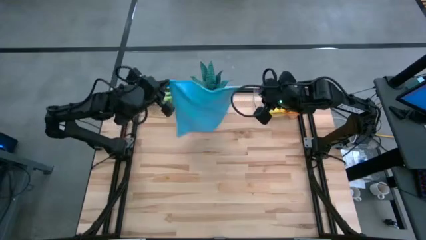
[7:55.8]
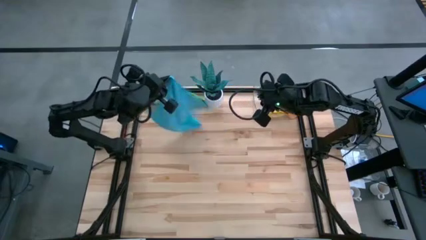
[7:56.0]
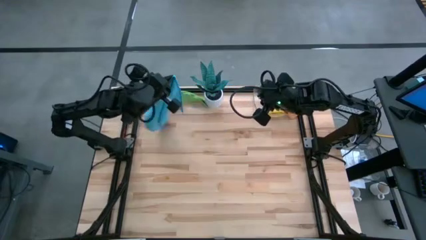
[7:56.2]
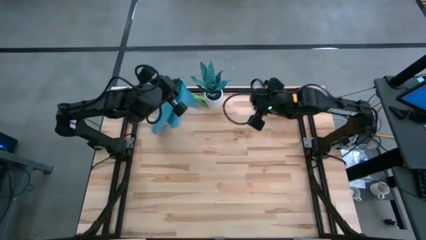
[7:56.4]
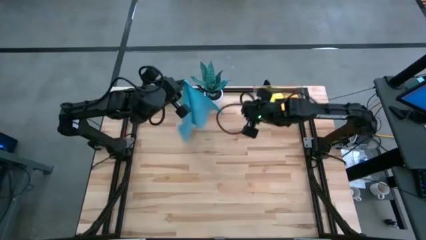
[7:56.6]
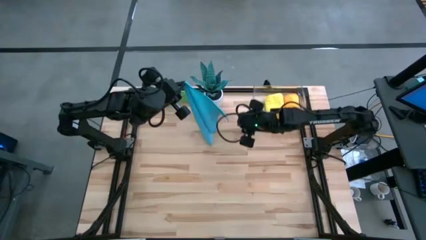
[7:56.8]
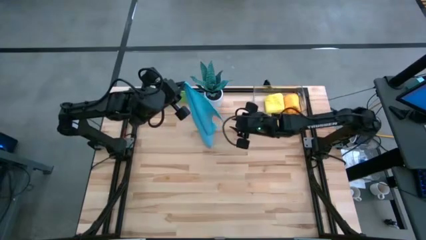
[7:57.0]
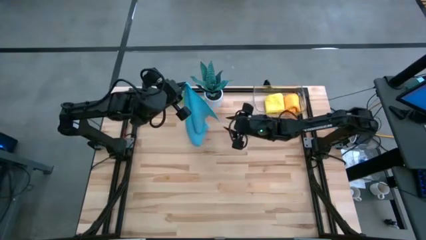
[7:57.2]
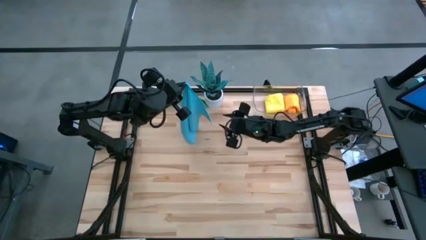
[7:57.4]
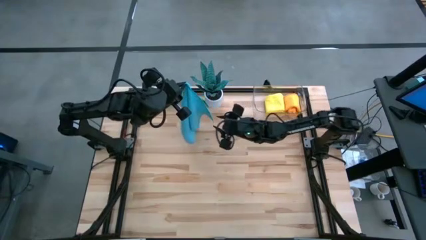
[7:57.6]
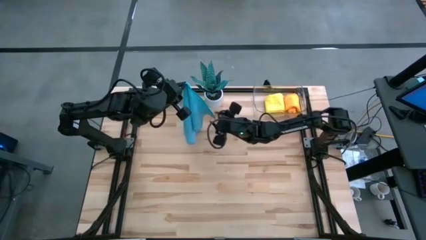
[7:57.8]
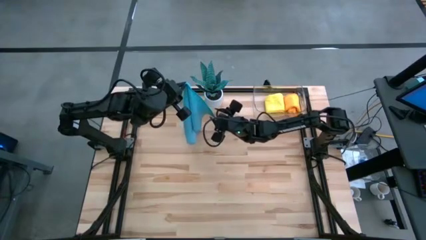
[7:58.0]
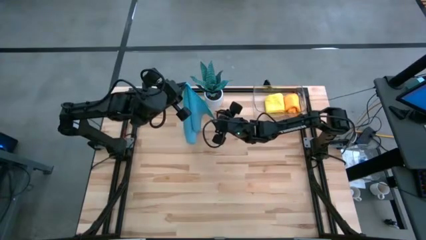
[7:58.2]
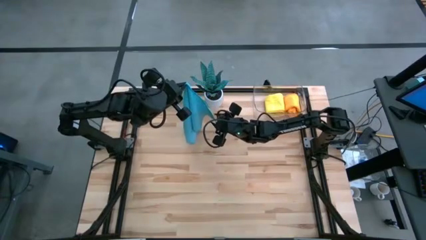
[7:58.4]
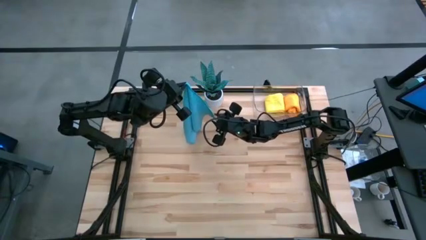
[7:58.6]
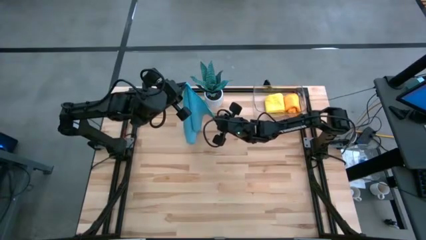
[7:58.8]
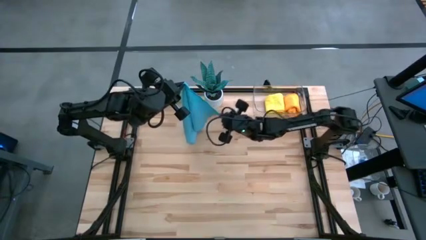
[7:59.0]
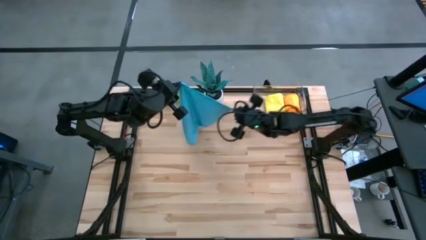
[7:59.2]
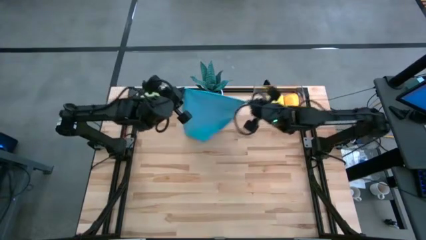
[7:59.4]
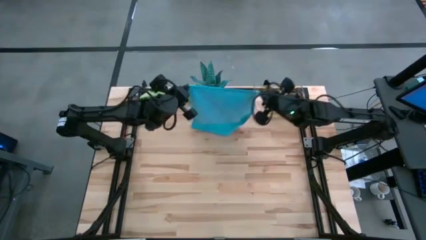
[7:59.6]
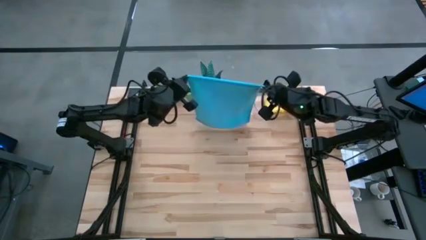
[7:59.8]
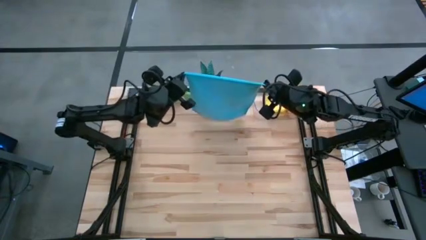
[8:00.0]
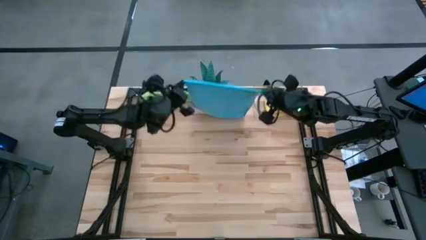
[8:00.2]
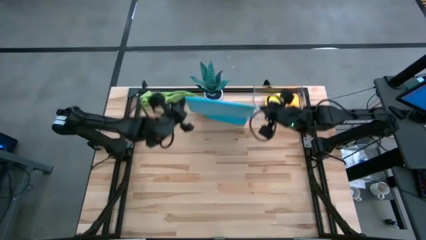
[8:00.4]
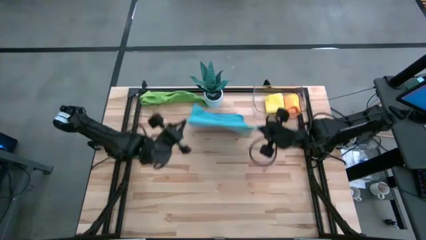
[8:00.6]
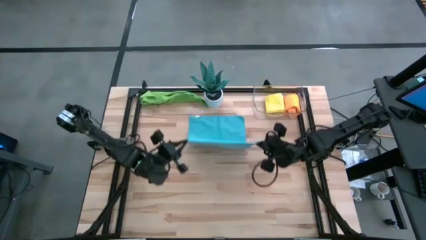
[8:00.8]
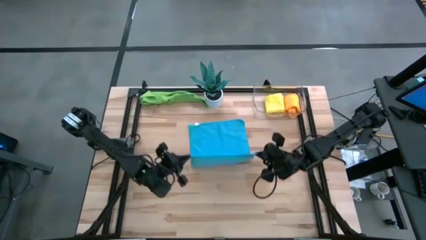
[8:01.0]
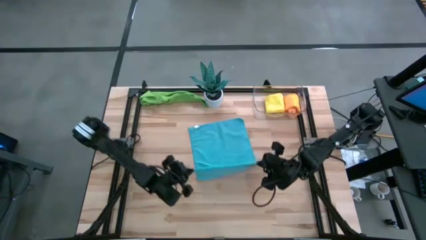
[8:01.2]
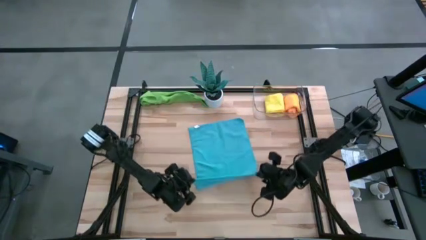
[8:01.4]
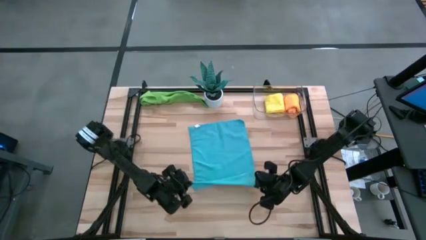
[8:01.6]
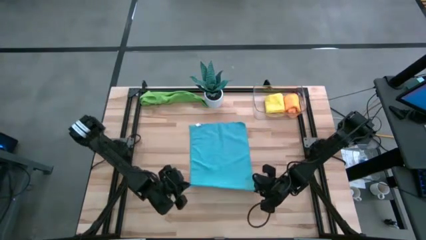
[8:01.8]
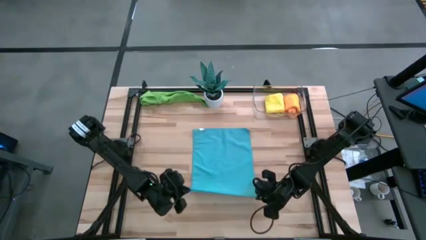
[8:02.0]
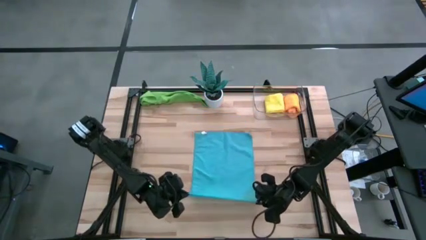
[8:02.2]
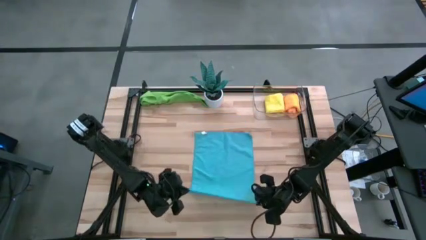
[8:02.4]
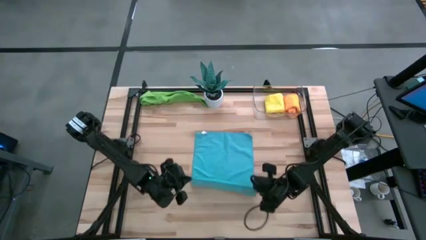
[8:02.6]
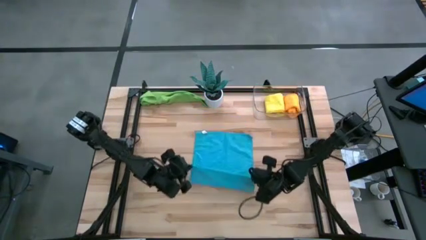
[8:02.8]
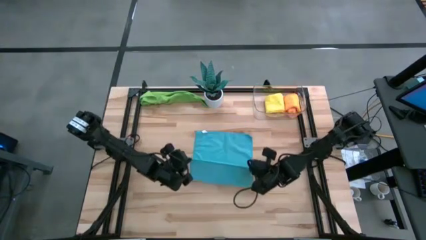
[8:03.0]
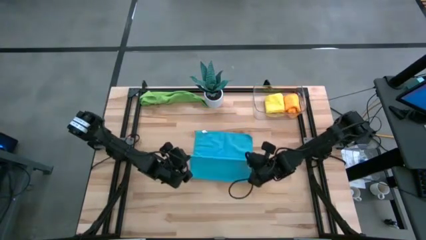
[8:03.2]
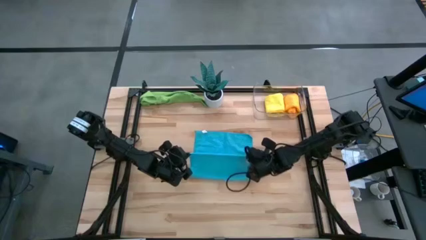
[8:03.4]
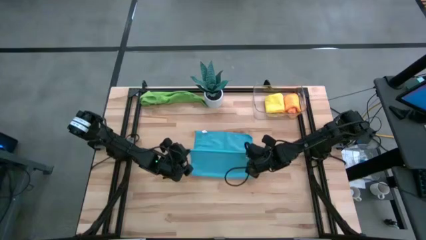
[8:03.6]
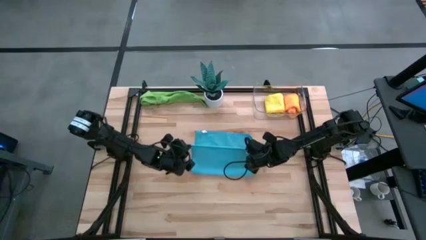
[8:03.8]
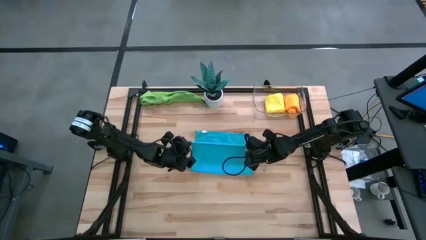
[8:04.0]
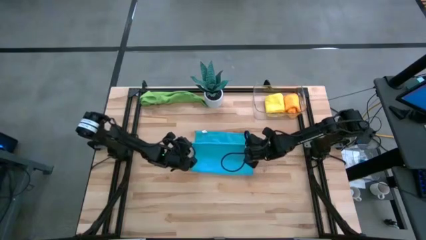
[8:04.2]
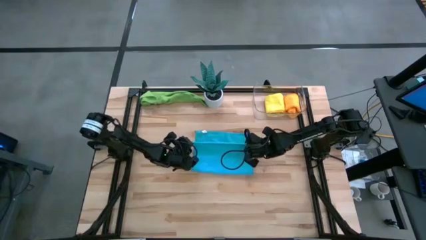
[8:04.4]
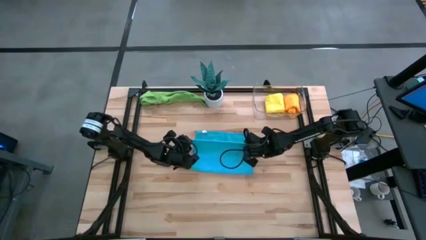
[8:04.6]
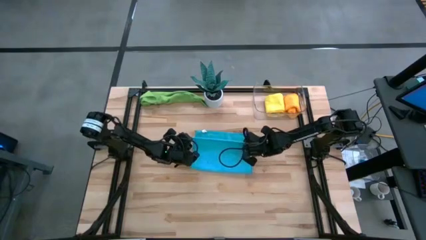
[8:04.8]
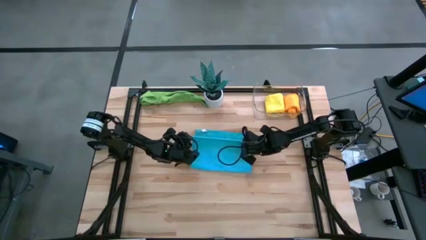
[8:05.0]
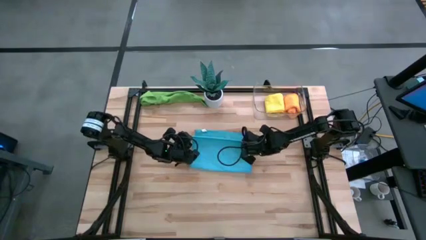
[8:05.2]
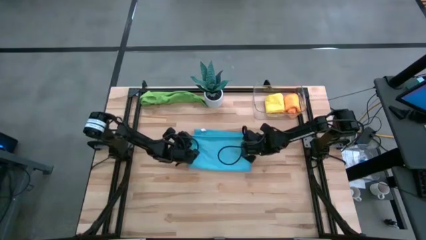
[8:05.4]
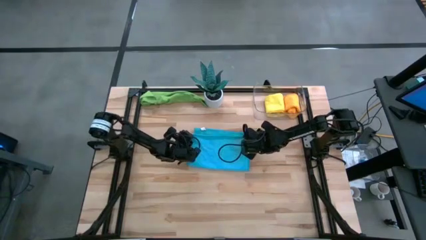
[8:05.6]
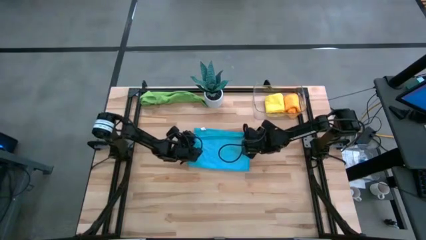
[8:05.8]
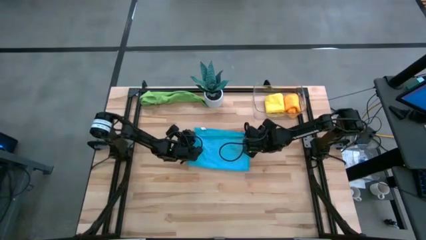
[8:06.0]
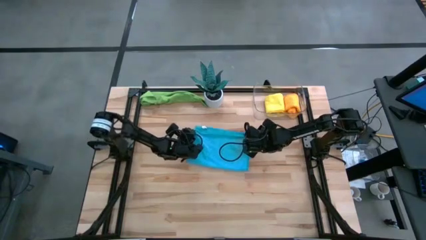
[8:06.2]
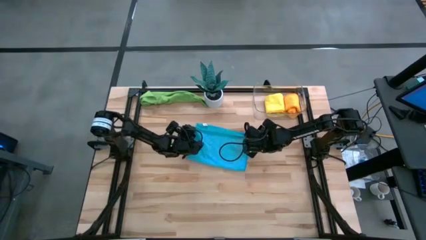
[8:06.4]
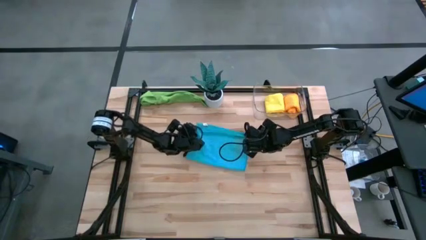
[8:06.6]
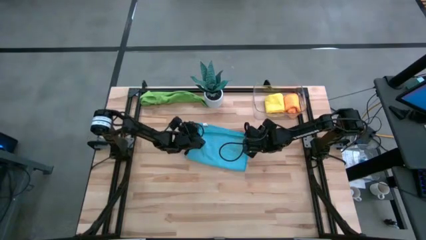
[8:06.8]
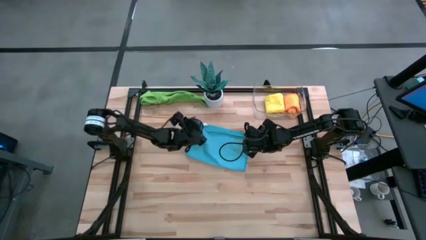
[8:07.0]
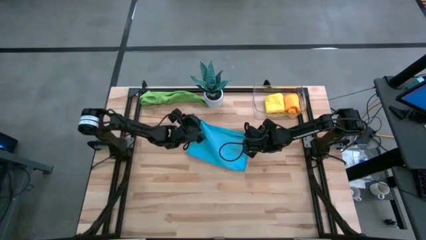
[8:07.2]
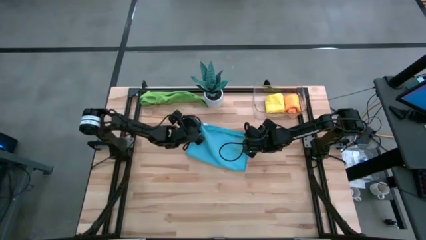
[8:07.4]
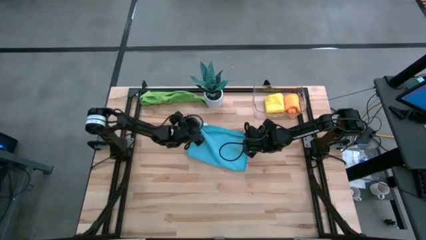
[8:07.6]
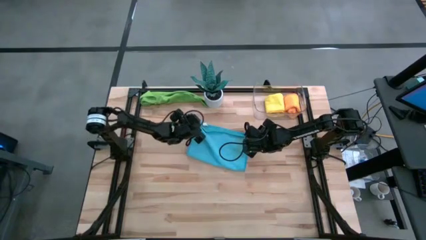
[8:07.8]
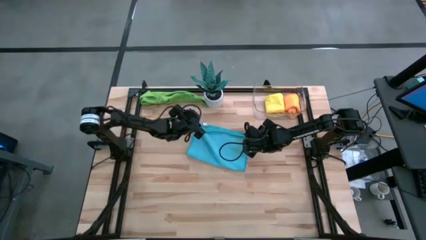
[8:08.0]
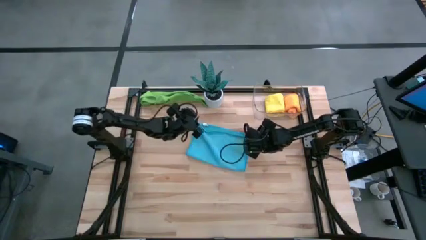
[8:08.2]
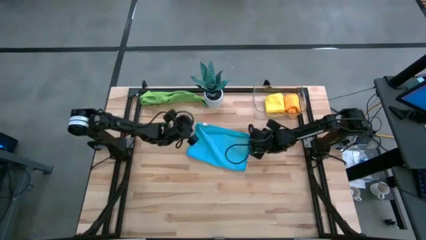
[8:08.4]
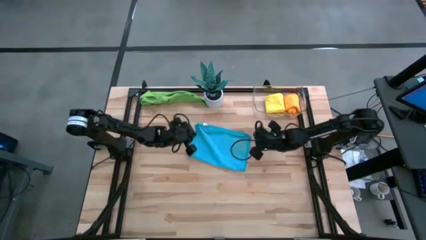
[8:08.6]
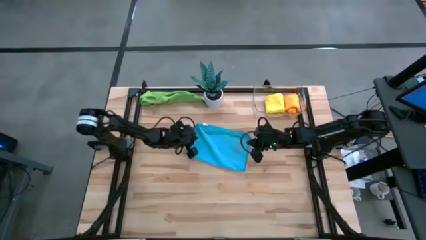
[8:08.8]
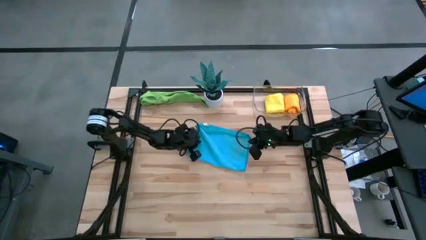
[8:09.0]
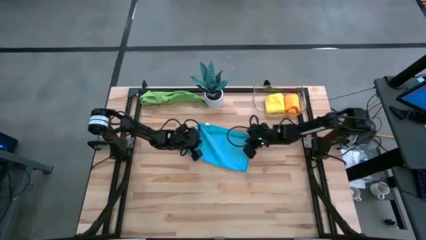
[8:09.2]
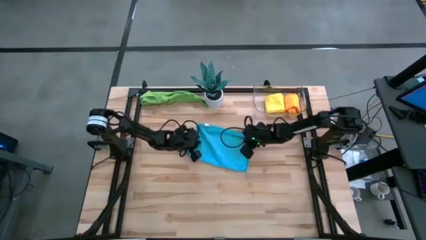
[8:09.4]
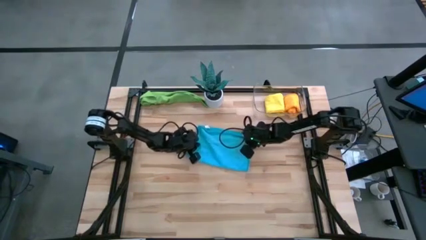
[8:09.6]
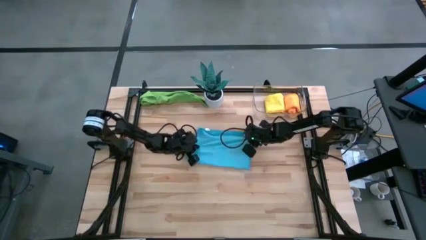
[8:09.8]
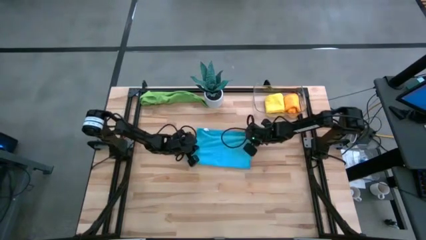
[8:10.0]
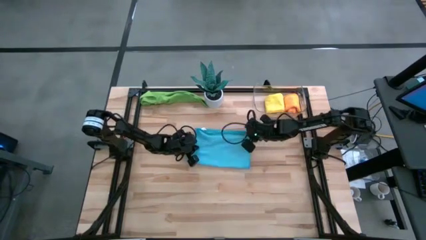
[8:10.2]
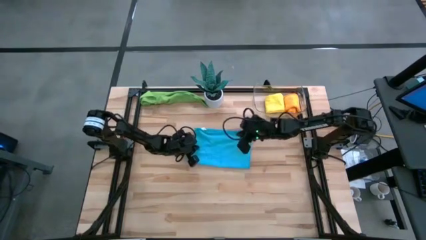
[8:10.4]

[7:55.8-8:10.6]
Task: Roll microfiber towels into tight, uniform cylinder then place into a basket
Fold the blue microfiber cloth

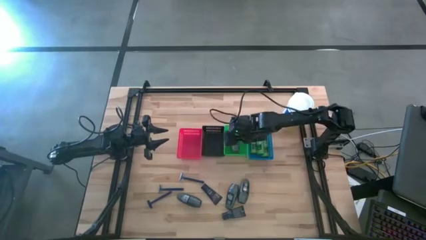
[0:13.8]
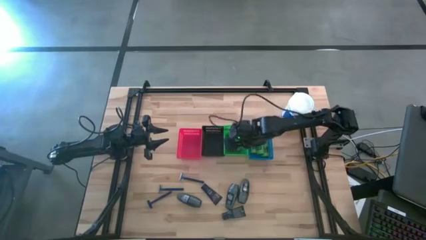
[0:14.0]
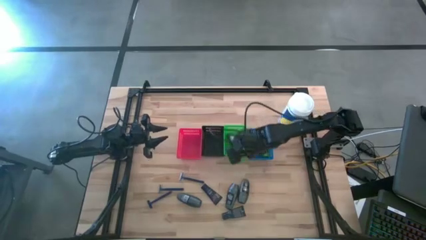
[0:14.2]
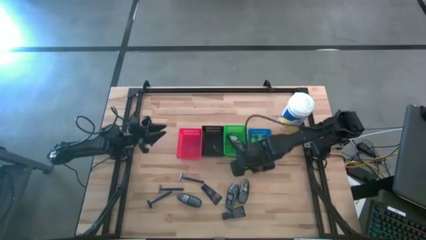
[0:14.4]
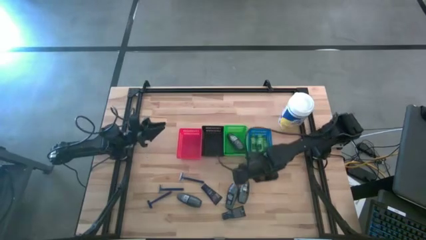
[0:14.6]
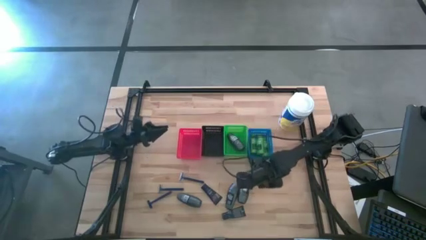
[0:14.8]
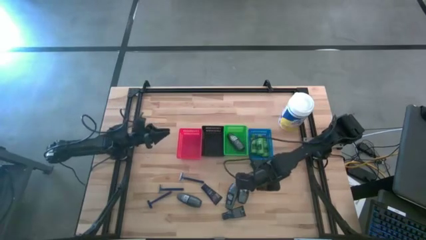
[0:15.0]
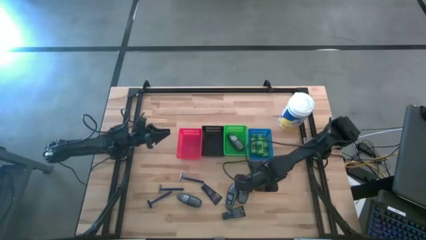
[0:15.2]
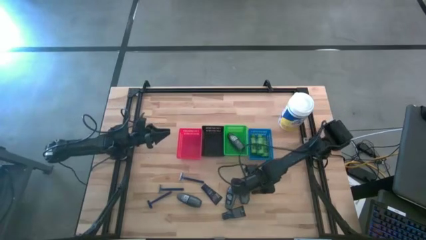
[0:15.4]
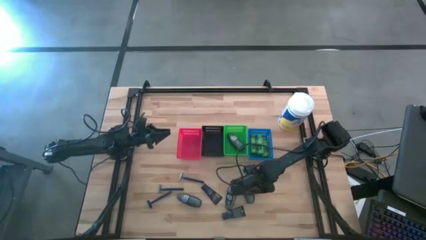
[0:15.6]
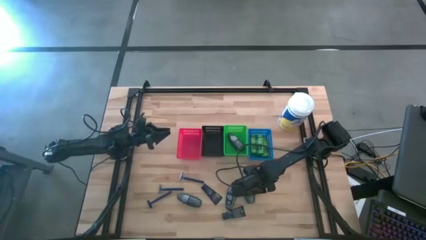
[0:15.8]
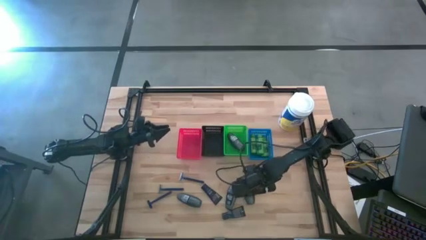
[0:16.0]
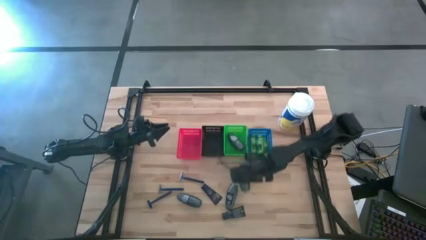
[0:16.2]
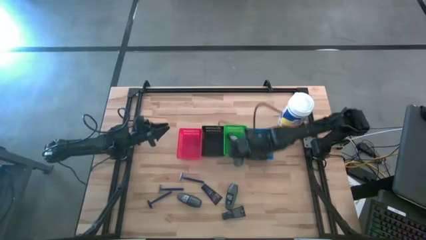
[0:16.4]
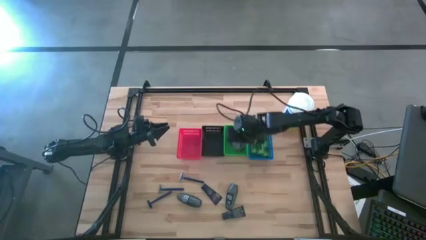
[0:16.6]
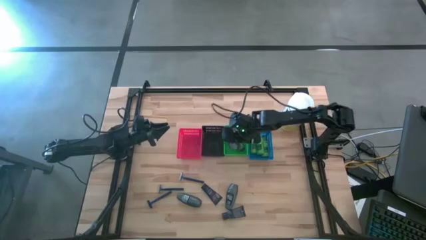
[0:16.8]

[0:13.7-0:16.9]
Task: Pick & Place Travel size toiletries
Put the black deodorant into the green bin
